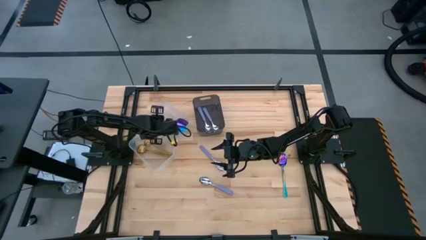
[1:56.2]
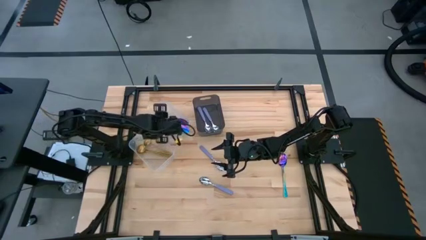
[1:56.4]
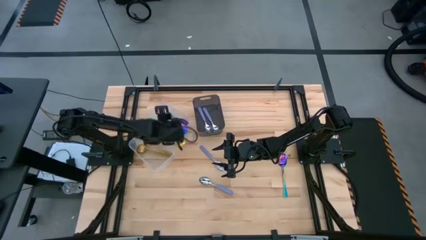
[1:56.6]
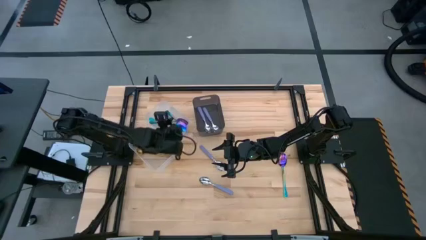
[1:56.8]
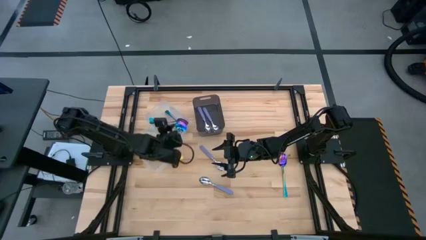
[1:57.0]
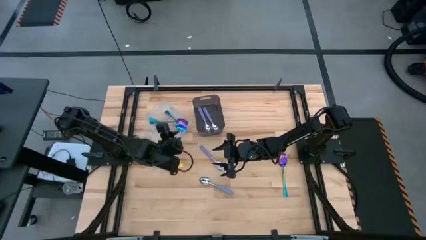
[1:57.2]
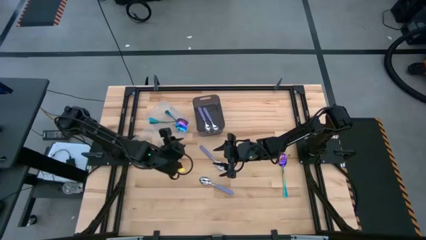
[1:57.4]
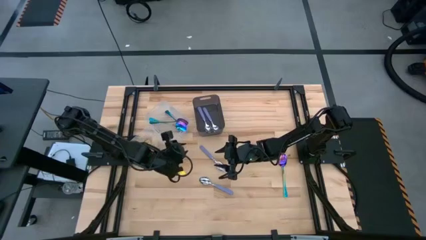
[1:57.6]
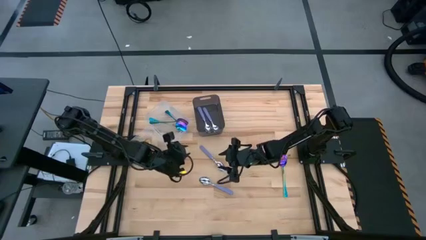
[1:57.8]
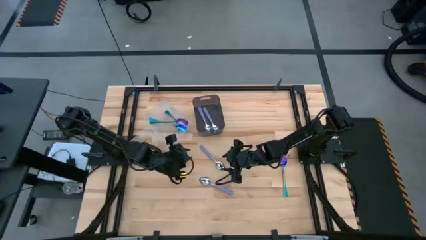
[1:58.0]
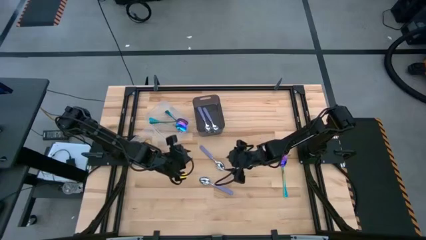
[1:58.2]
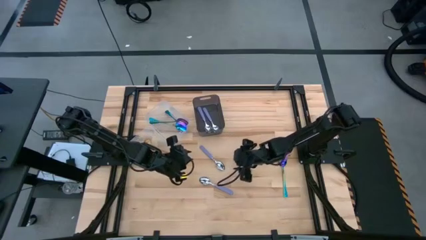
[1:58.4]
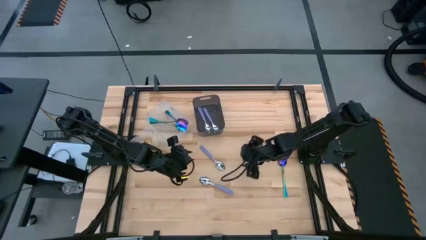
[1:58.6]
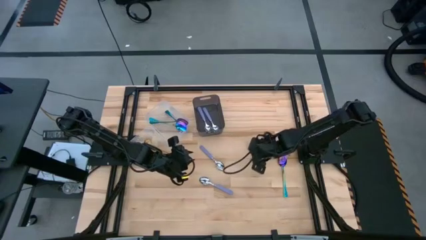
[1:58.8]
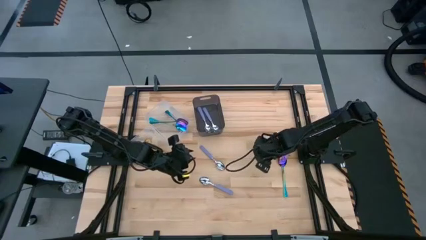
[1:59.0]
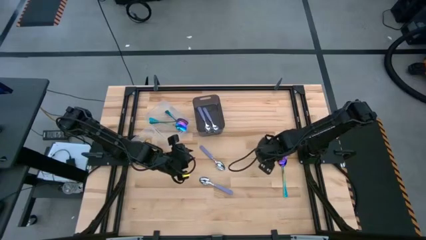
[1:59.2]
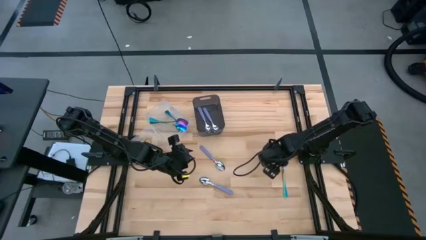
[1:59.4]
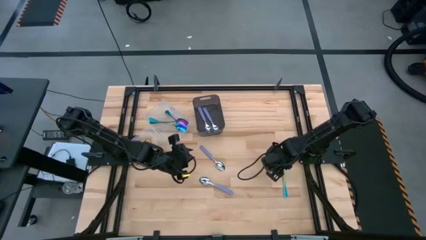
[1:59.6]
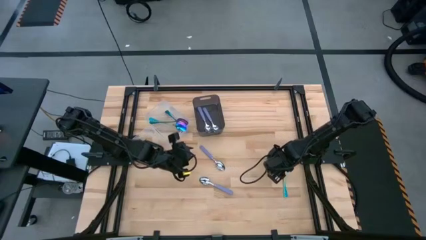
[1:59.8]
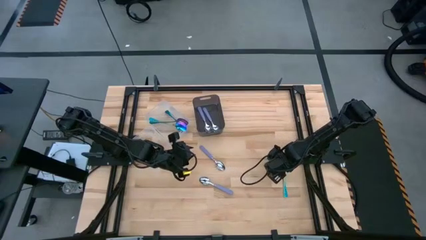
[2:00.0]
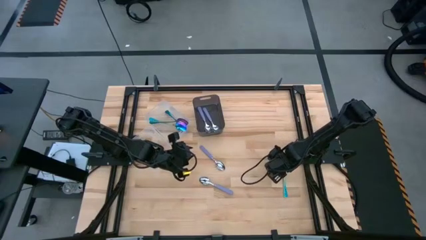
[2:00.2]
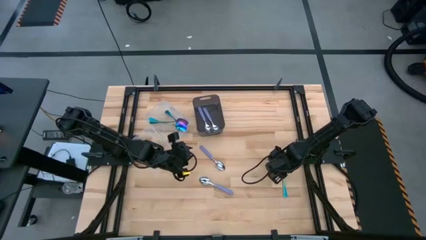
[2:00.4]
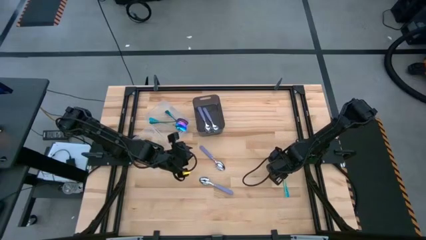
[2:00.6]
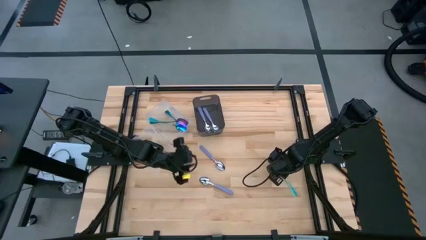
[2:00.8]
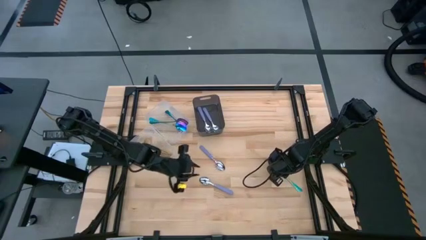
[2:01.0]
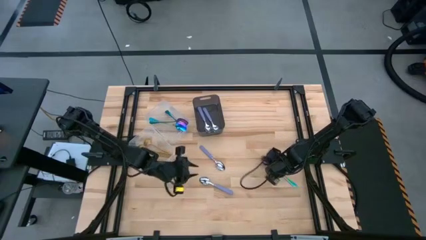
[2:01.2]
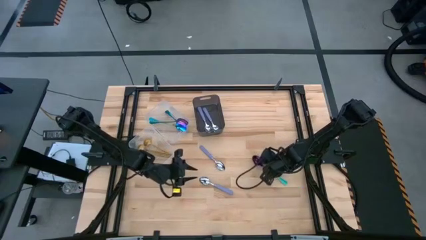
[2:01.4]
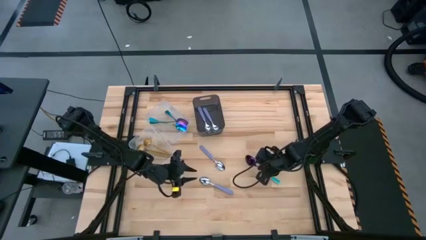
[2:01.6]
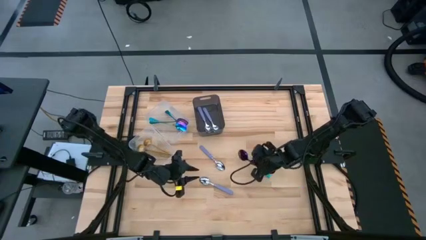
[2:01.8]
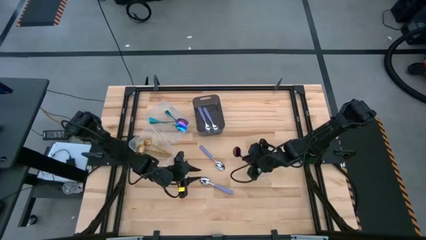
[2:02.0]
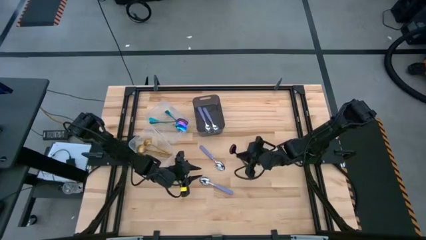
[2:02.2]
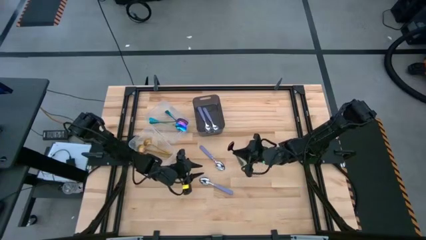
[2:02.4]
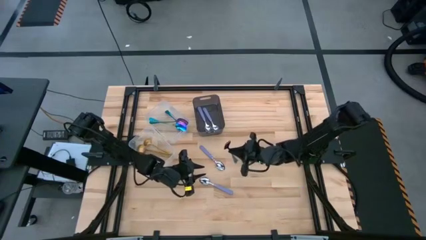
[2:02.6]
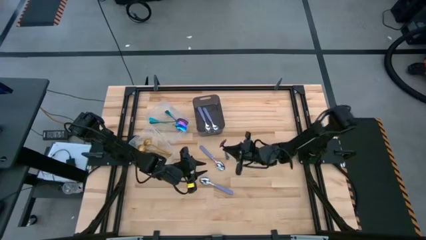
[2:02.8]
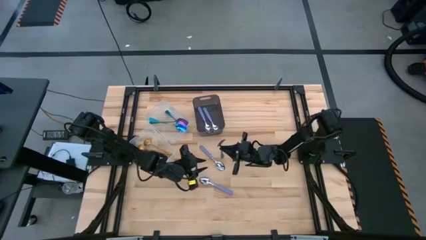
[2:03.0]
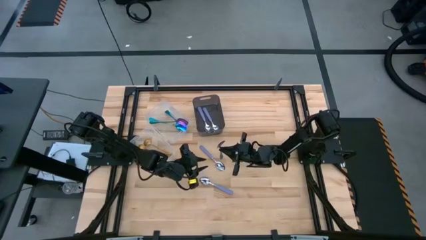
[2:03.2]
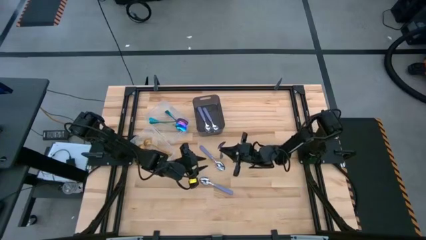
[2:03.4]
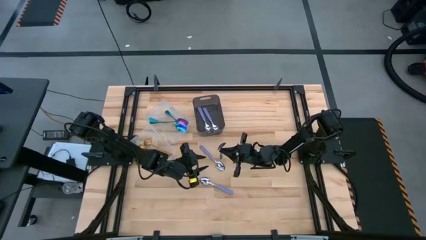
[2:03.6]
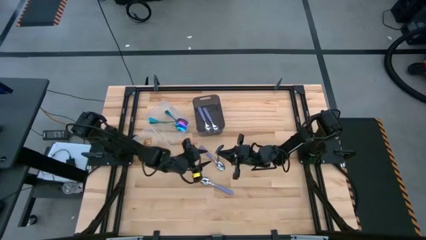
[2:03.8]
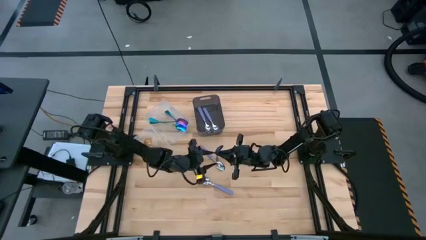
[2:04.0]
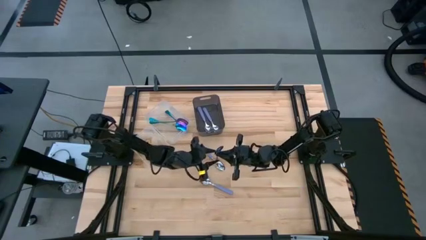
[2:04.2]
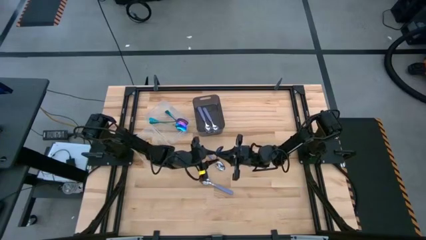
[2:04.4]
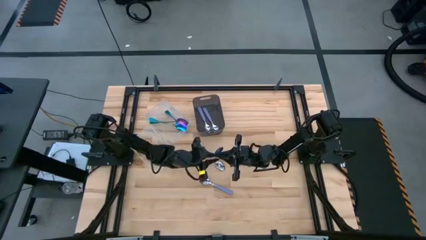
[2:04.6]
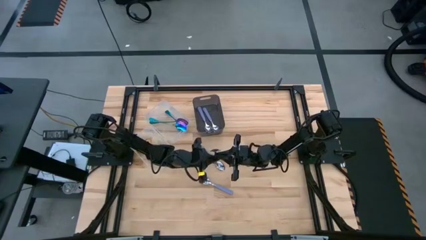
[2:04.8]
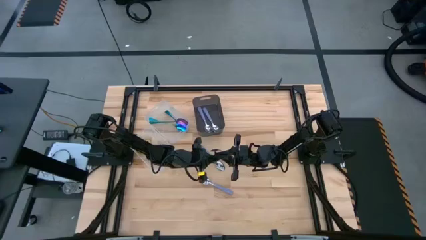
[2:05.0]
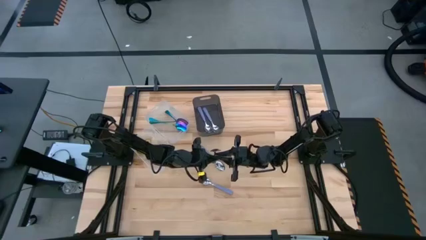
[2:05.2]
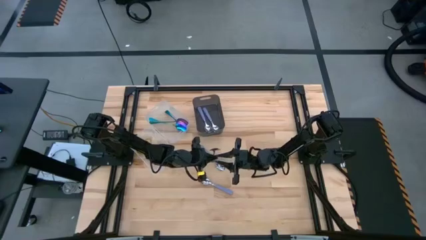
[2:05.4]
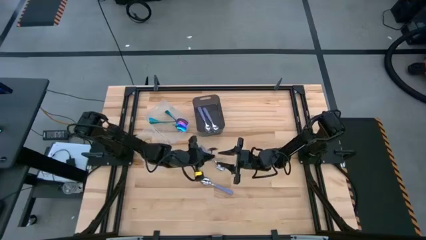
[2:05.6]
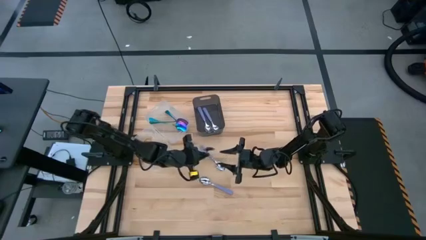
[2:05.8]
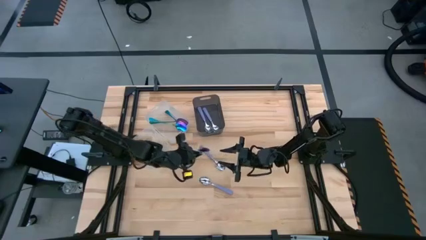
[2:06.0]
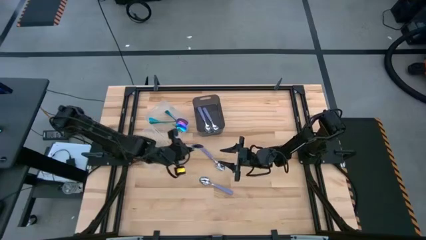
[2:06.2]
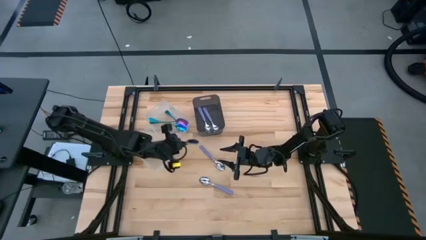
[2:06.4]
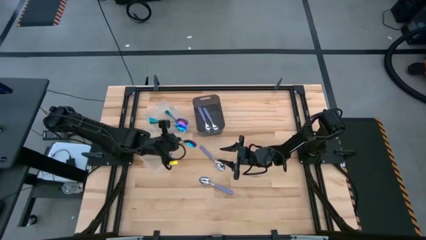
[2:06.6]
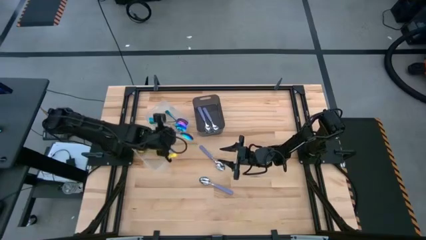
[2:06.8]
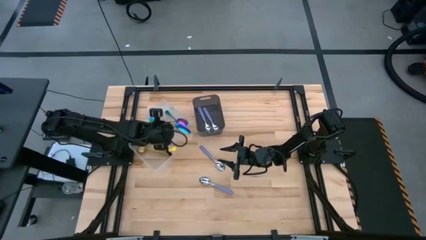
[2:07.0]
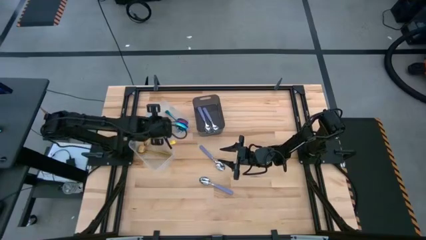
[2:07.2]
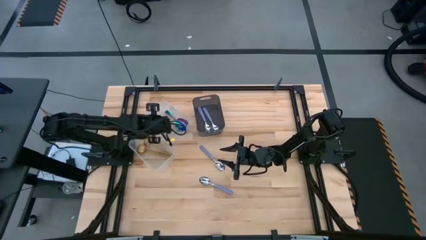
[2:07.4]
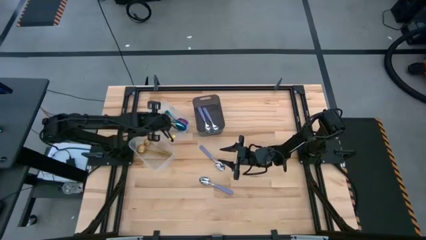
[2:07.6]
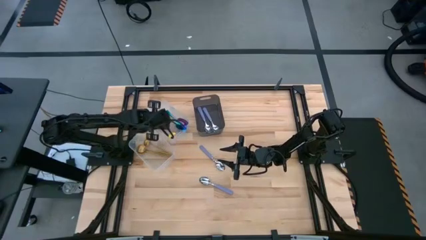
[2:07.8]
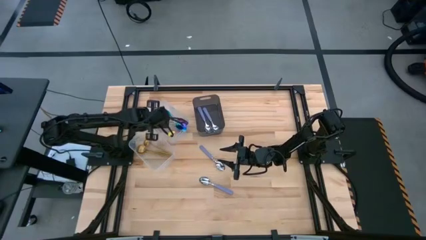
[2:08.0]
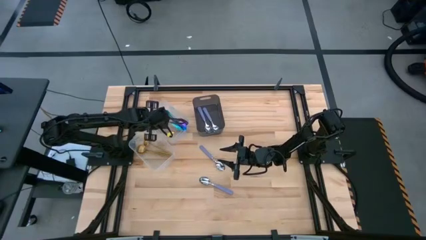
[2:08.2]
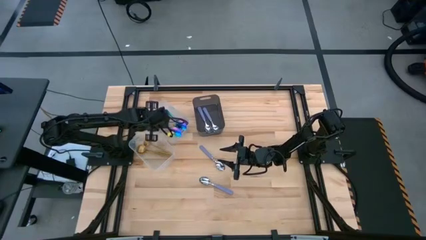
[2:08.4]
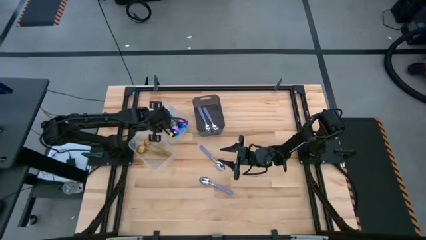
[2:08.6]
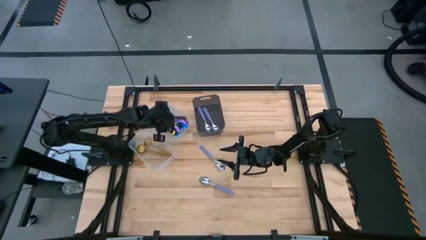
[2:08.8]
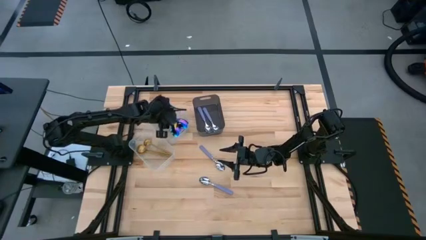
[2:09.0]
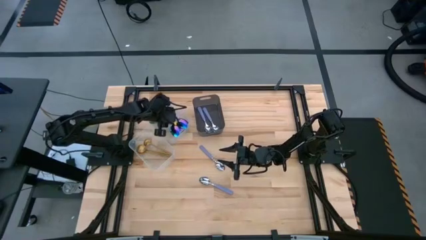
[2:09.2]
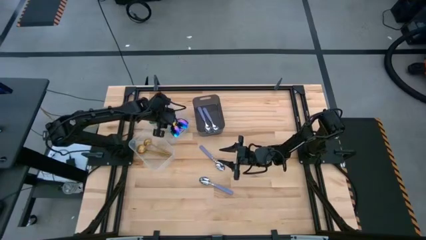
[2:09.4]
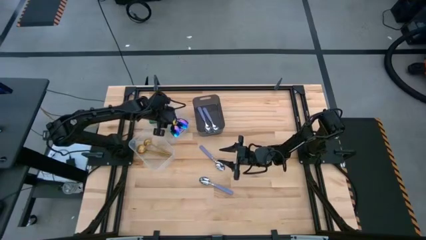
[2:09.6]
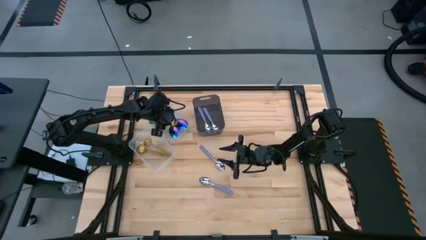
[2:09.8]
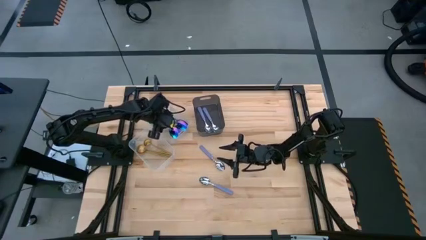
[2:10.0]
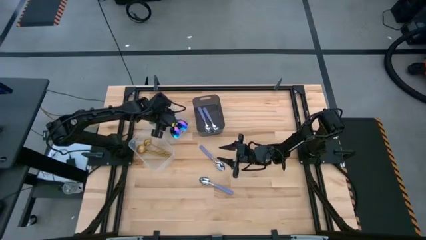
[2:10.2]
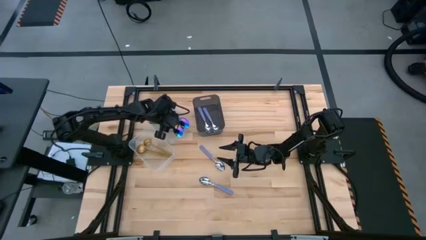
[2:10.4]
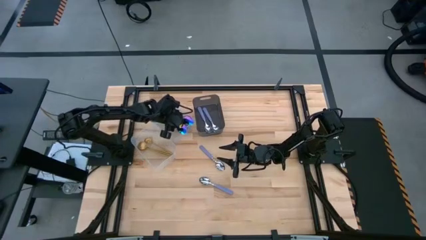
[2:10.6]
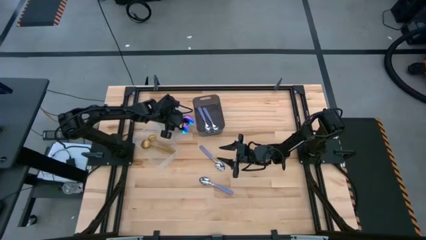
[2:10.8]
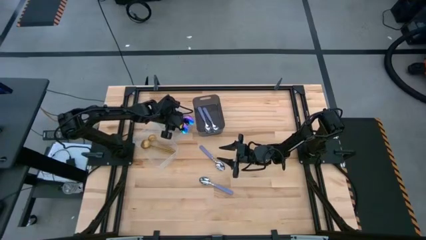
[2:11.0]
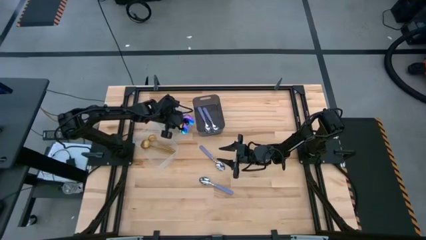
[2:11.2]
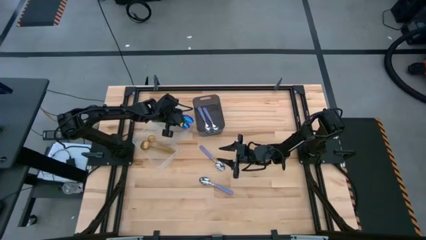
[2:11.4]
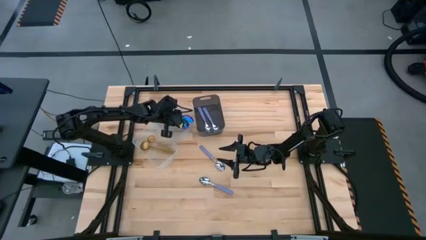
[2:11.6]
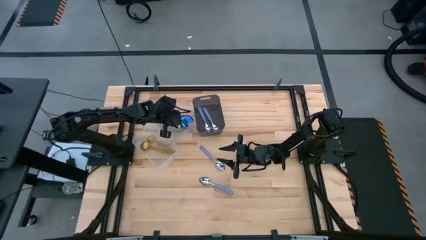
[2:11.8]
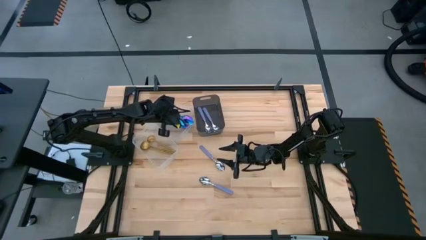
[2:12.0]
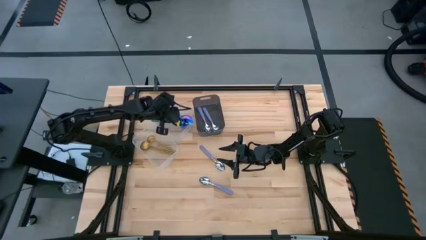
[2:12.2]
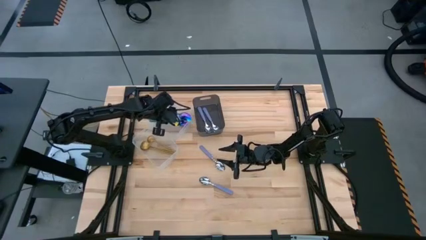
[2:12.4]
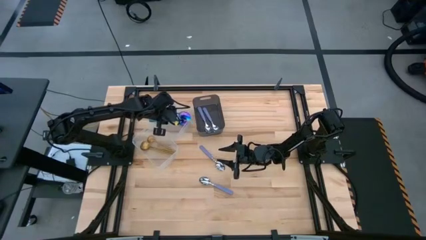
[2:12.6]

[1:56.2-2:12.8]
Task: Sort silverware by color (type)
Put the blue spoon into the top transparent bin
